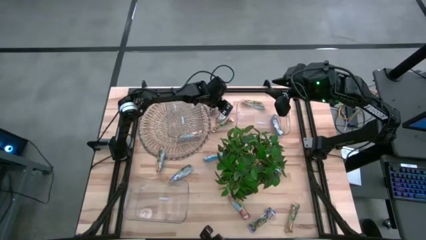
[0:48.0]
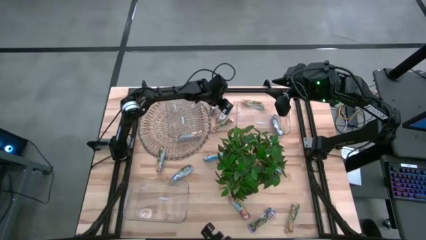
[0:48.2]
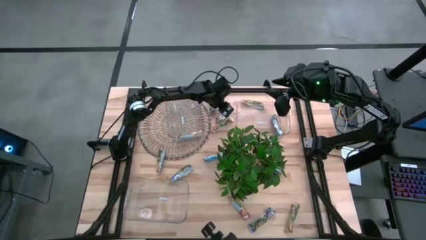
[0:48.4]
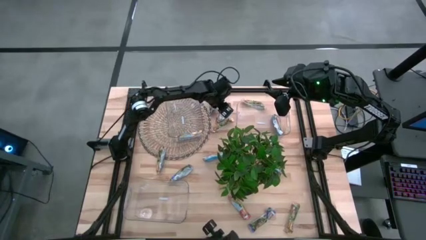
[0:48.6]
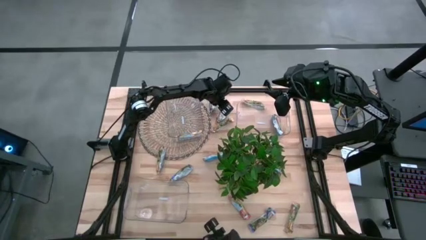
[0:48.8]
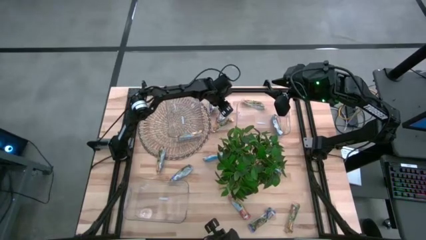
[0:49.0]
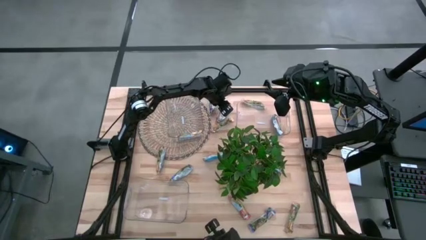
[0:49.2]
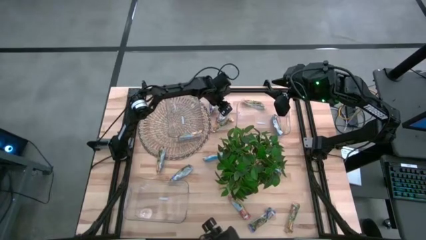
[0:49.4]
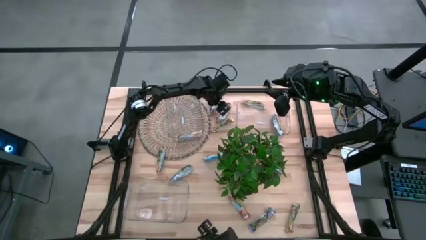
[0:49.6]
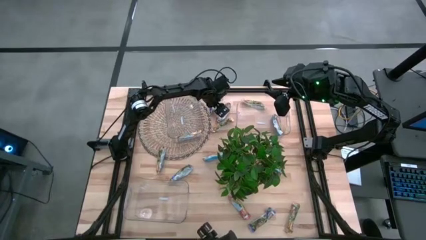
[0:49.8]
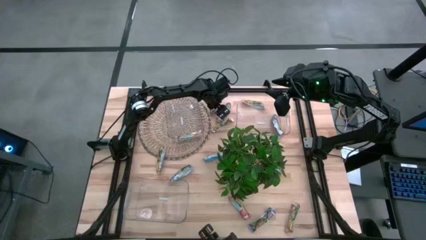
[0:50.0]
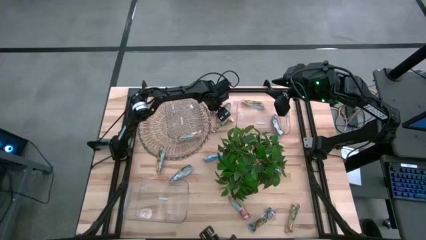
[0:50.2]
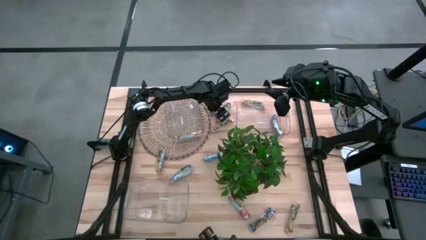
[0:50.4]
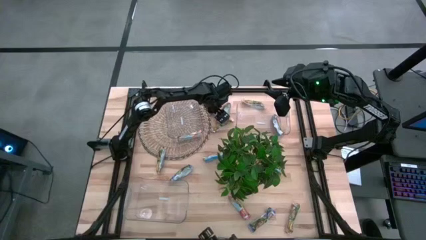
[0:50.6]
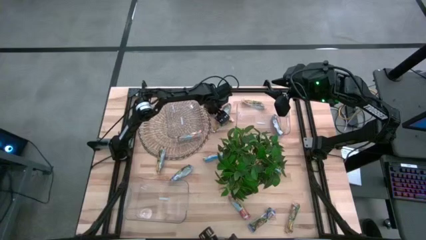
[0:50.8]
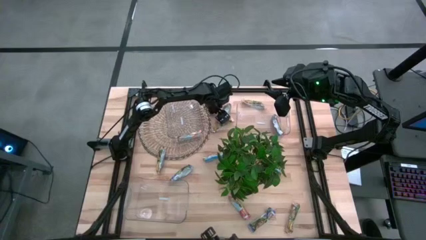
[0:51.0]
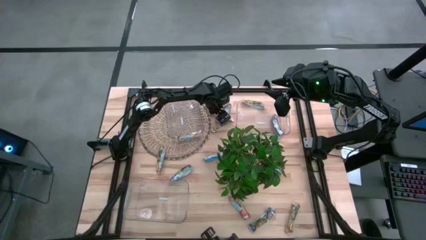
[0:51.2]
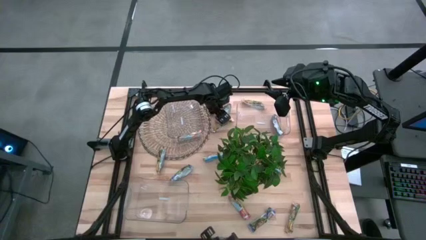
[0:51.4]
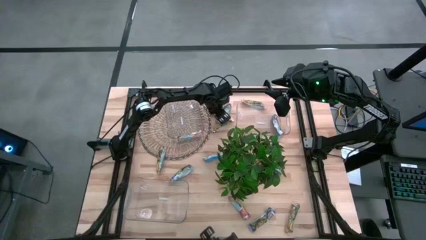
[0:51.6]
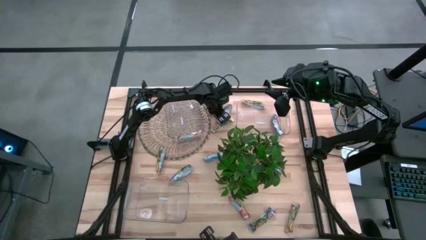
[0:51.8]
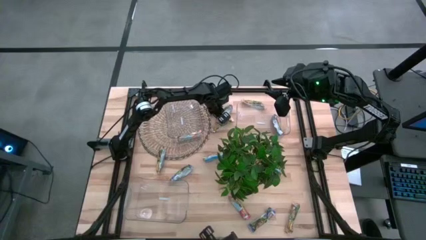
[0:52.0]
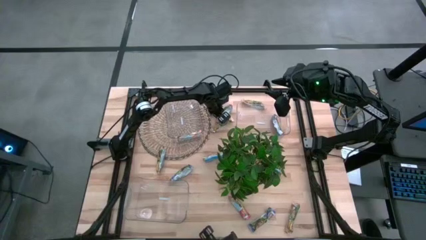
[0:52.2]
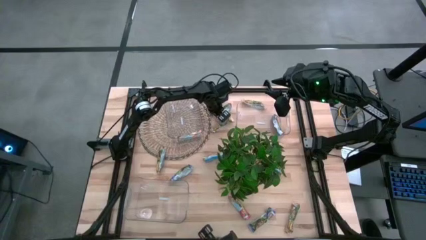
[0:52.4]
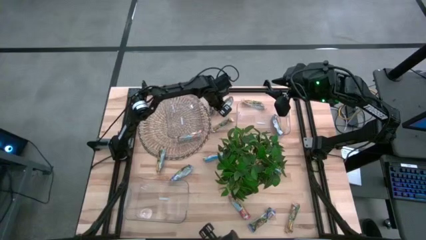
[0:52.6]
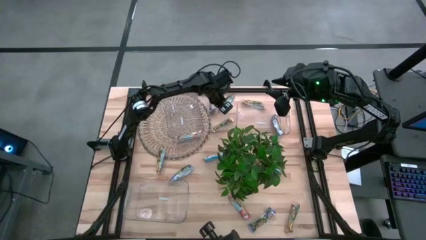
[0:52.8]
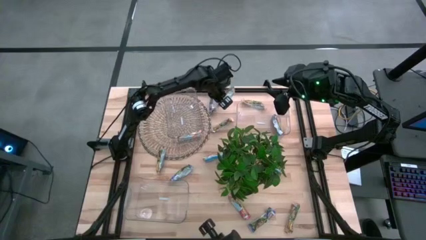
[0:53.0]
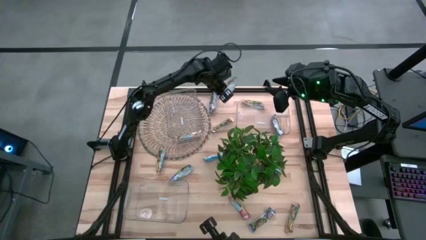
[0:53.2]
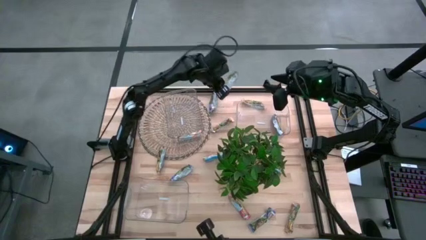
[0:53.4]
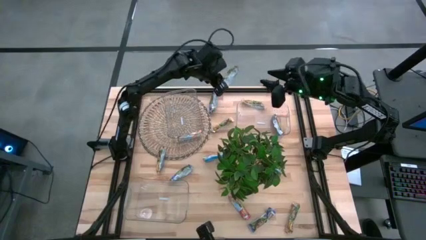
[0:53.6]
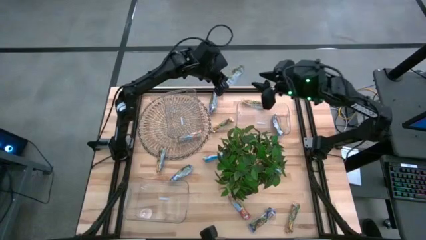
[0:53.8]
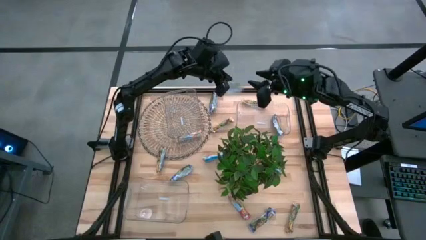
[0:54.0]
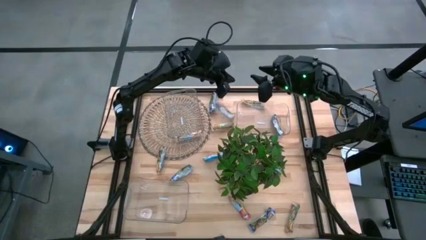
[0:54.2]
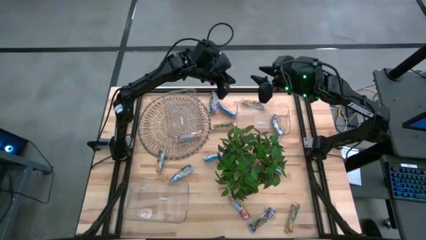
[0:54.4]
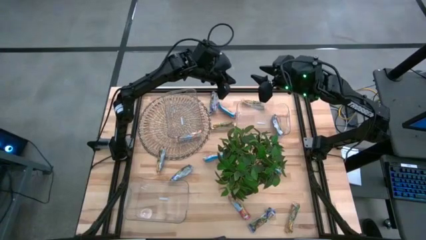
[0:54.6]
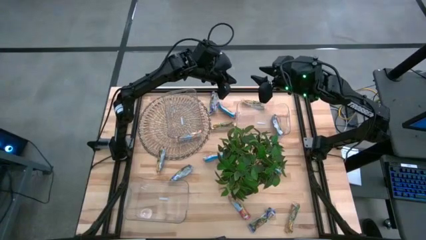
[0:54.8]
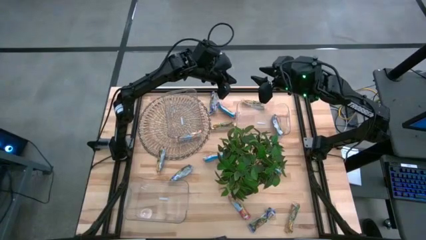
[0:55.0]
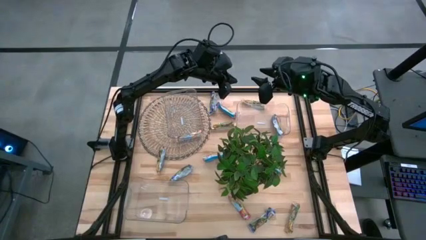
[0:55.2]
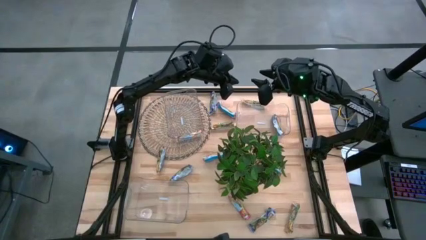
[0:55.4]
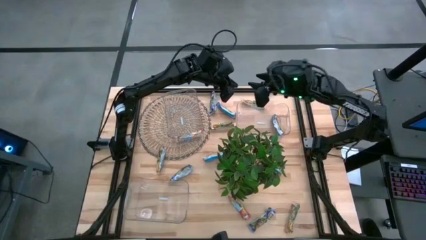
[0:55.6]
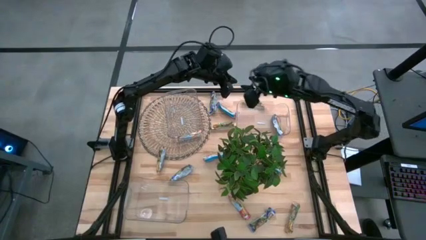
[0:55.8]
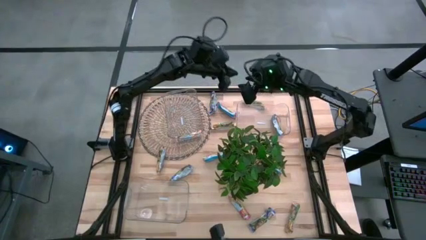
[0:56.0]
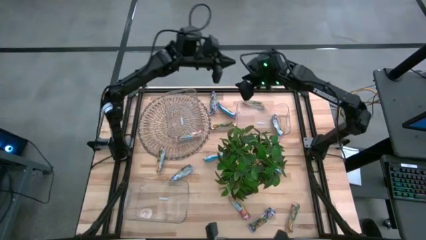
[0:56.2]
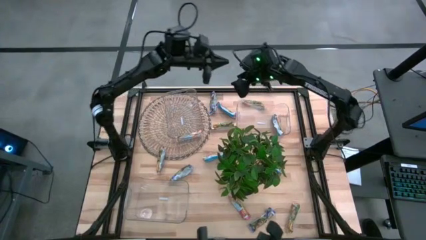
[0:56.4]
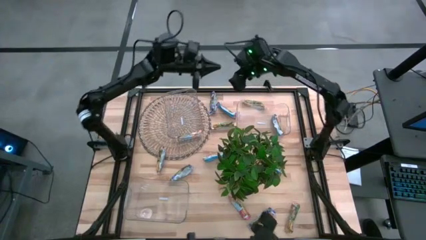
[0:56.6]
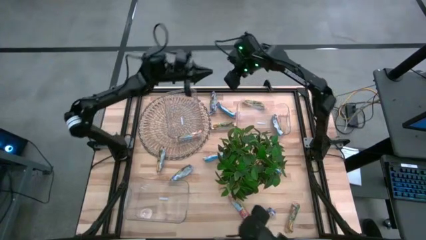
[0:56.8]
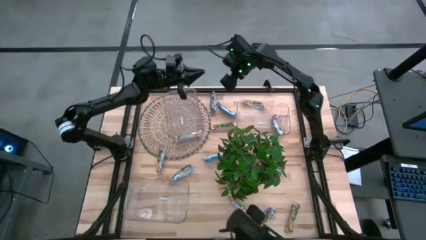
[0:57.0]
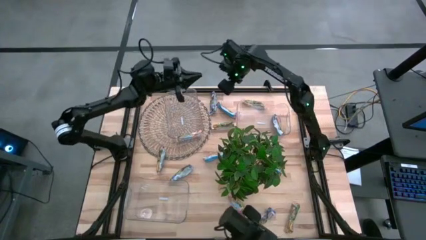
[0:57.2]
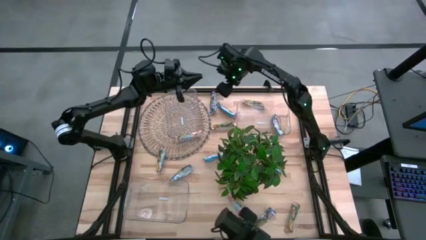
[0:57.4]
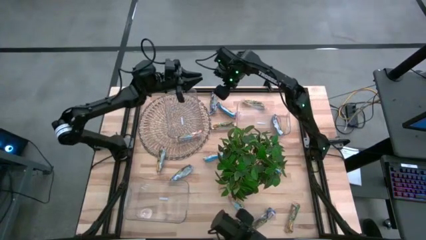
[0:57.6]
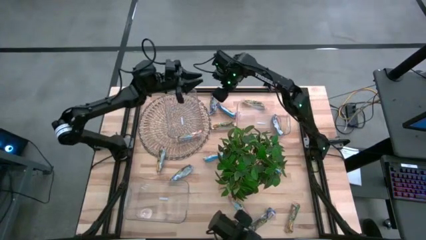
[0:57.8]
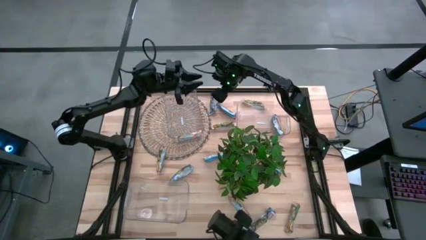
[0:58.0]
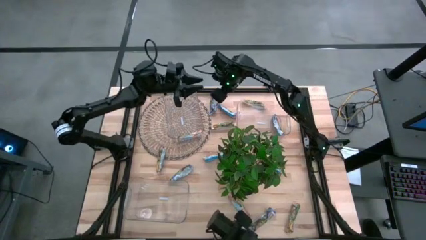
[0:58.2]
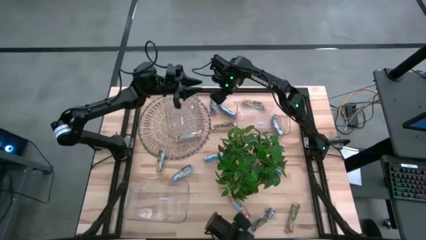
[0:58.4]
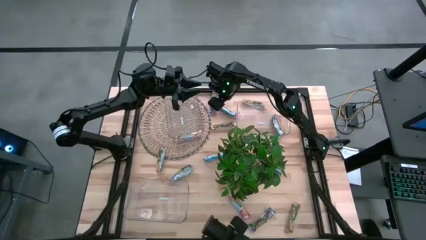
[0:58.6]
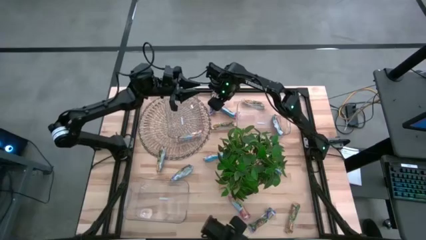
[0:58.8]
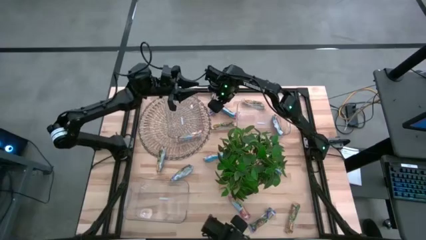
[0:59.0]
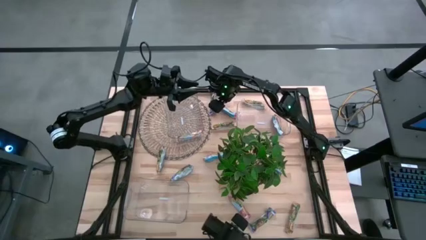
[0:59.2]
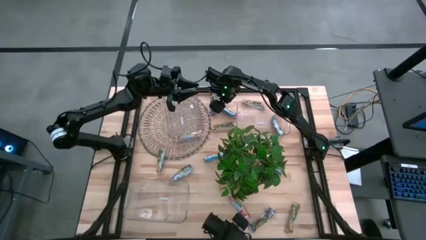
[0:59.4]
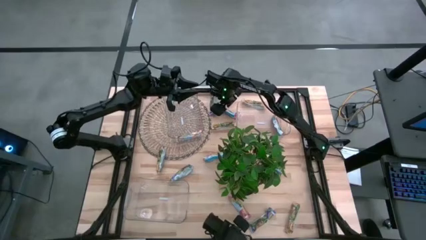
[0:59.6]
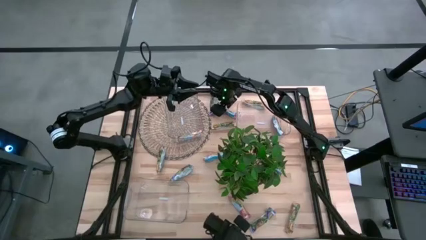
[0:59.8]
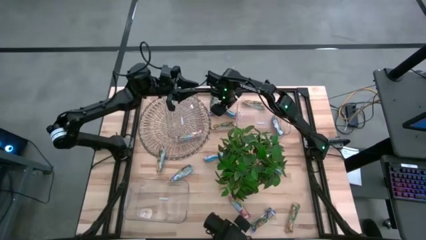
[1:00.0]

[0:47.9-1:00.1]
Task: Pick and place Granola Bars by type
Put the top red granola bar into the top right transparent bin

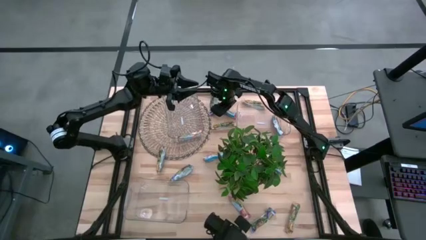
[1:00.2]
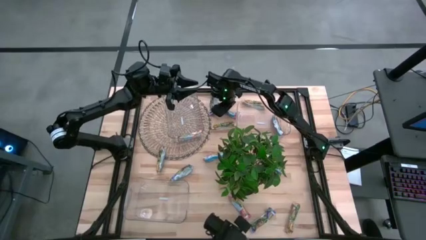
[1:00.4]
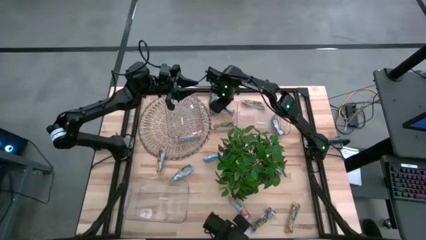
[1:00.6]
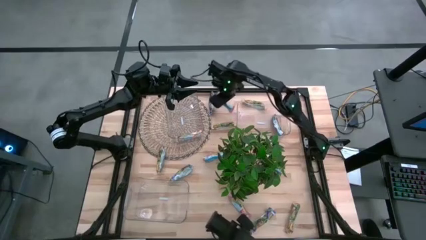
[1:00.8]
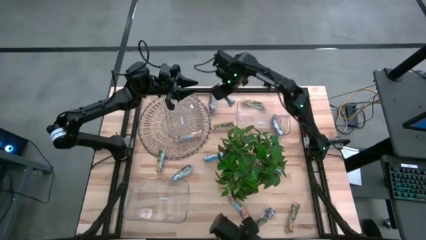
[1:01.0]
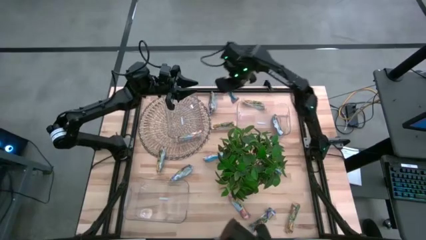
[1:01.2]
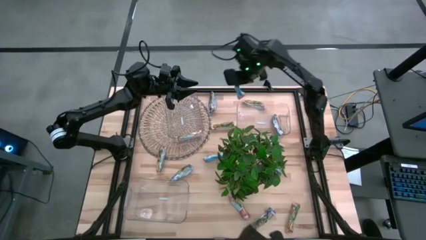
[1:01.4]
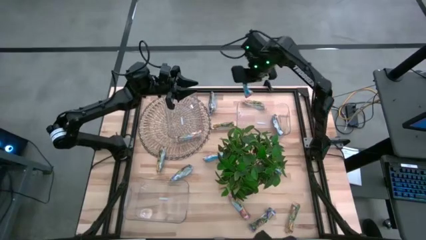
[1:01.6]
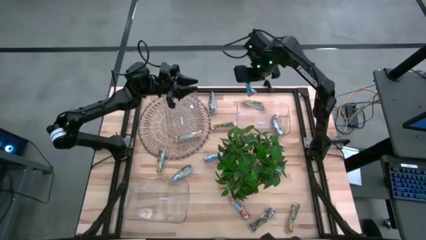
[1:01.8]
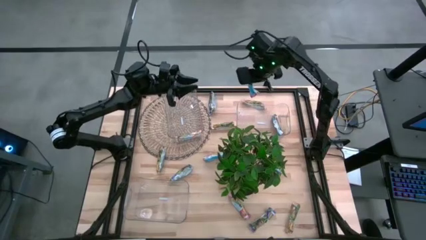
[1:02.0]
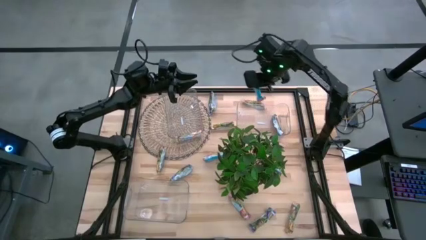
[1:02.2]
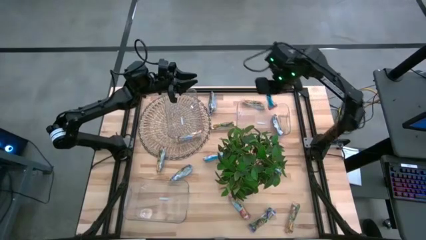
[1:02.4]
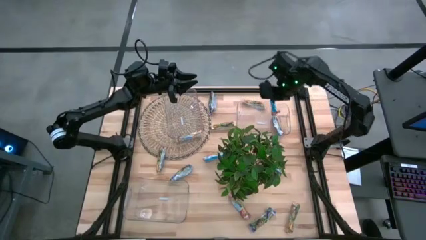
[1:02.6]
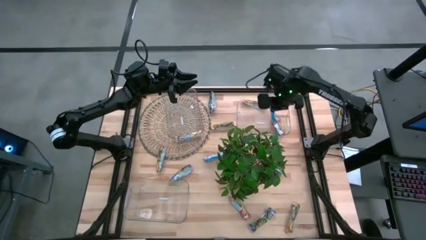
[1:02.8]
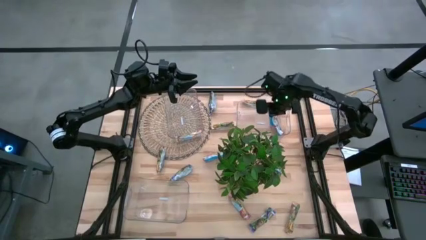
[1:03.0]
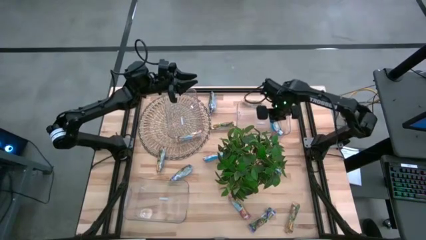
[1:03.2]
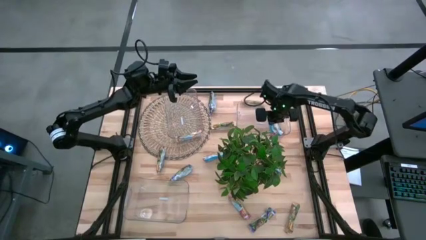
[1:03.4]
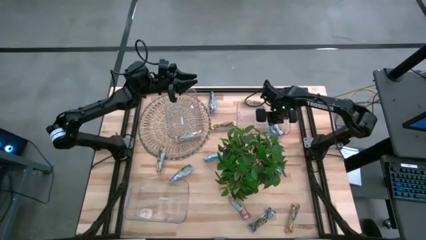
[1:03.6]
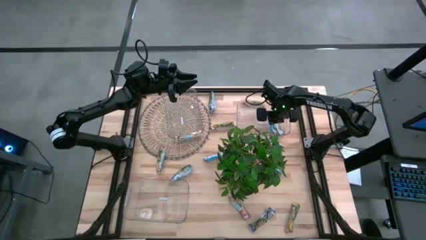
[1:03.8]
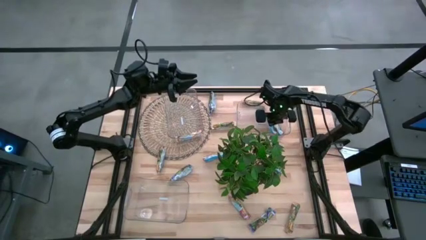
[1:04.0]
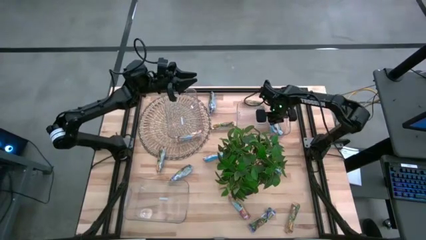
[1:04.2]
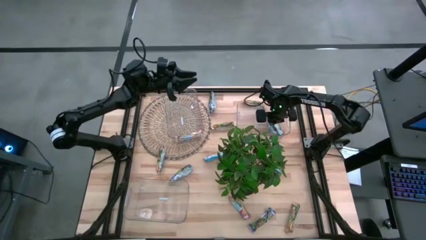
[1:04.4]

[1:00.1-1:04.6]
Put the top red granola bar into the top right transparent bin
